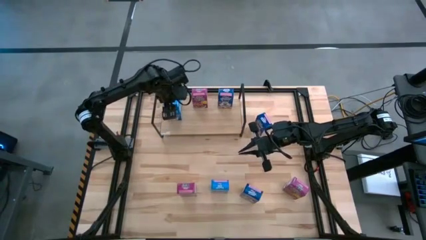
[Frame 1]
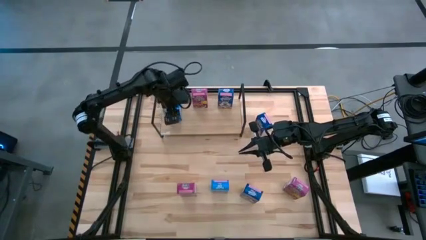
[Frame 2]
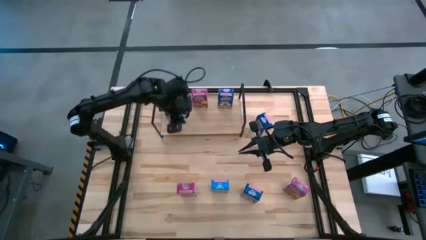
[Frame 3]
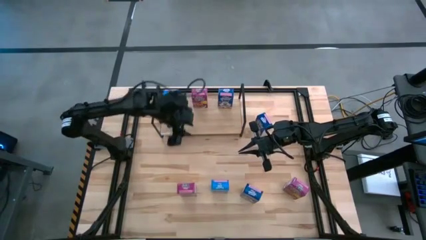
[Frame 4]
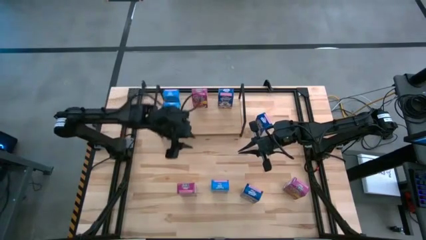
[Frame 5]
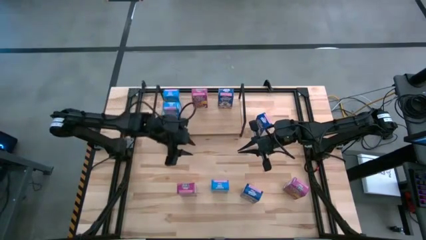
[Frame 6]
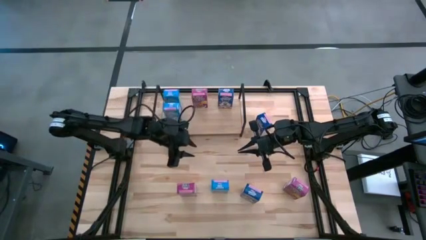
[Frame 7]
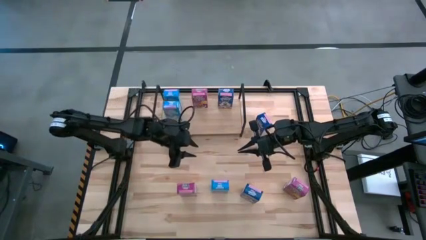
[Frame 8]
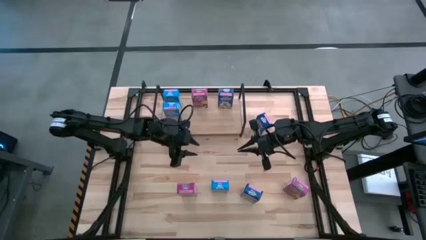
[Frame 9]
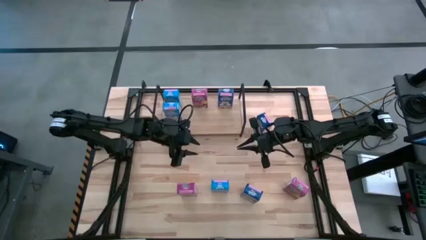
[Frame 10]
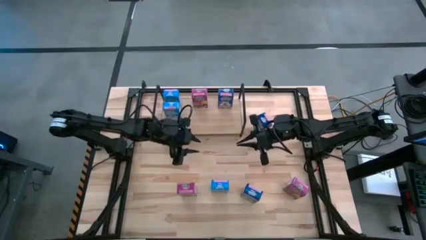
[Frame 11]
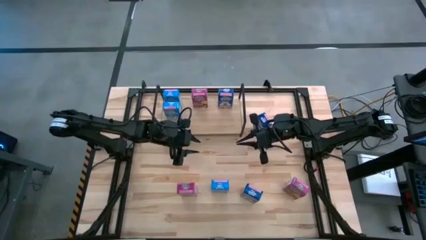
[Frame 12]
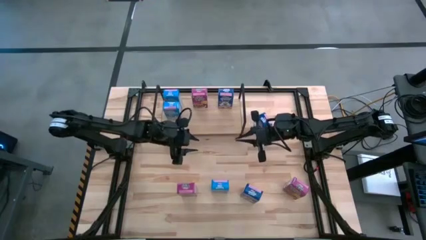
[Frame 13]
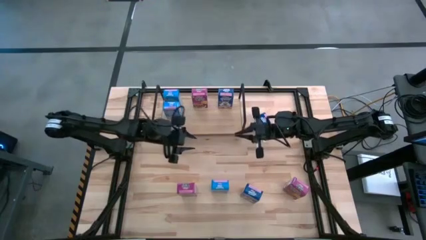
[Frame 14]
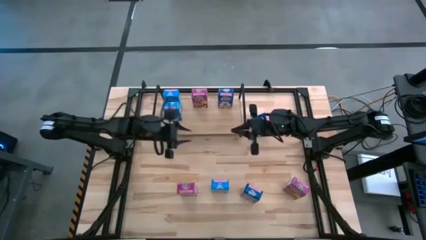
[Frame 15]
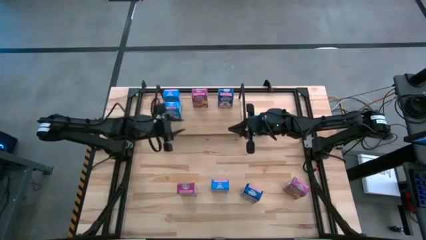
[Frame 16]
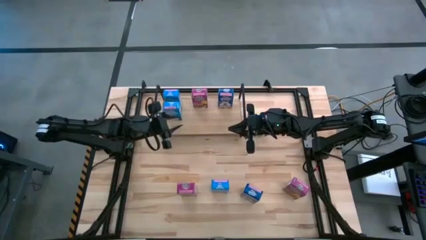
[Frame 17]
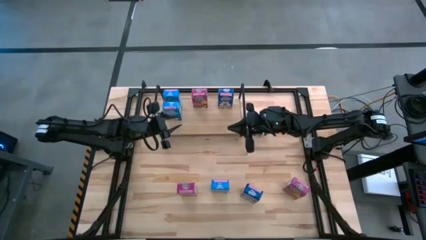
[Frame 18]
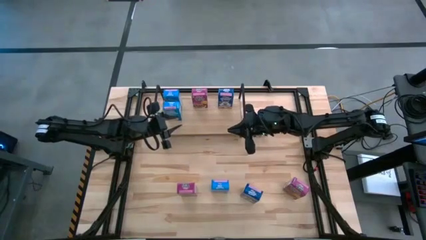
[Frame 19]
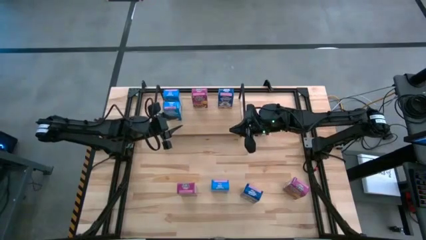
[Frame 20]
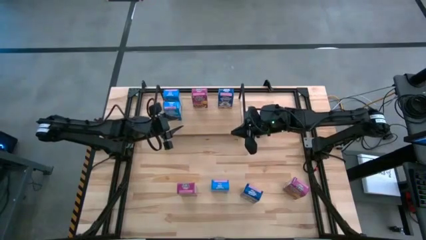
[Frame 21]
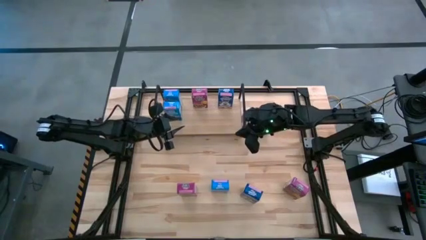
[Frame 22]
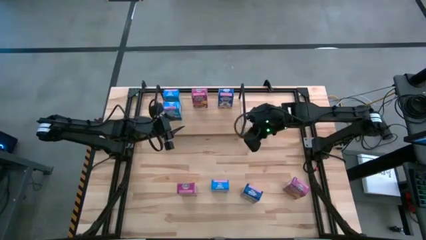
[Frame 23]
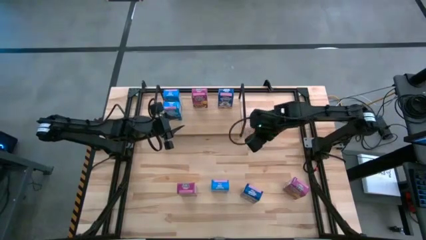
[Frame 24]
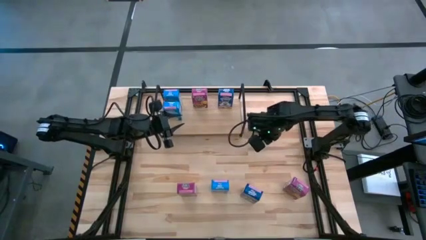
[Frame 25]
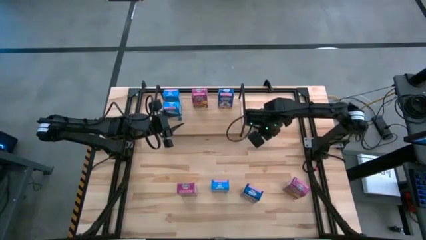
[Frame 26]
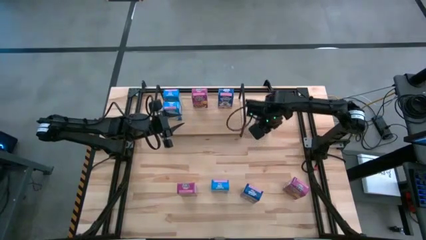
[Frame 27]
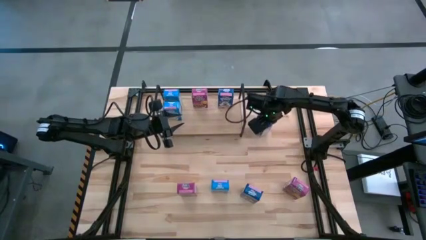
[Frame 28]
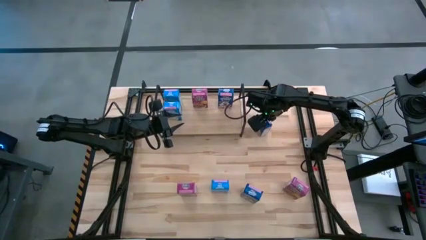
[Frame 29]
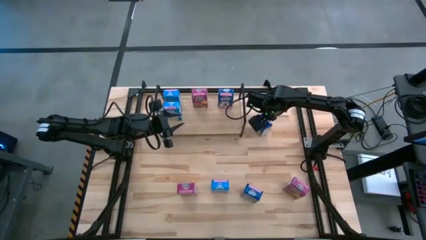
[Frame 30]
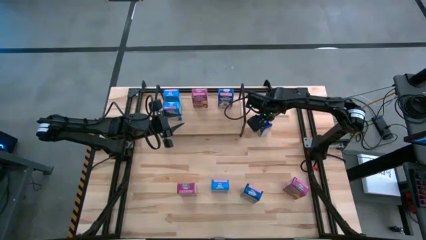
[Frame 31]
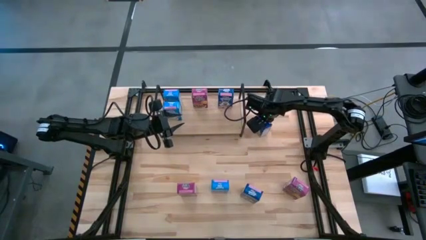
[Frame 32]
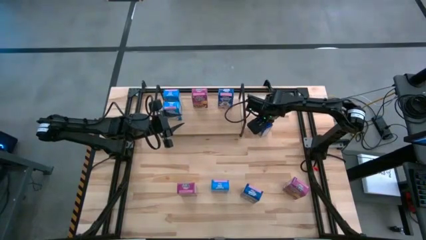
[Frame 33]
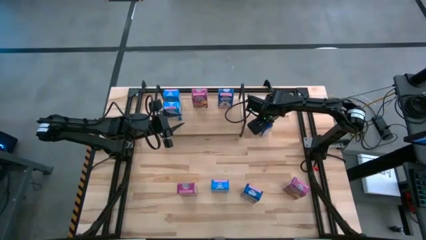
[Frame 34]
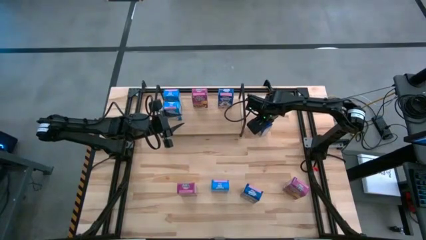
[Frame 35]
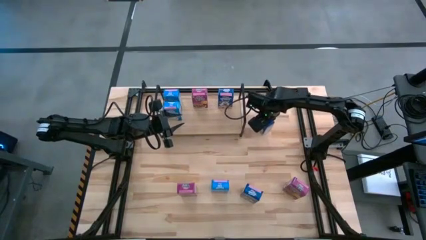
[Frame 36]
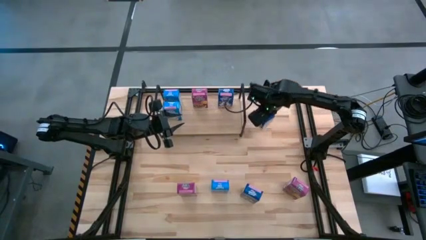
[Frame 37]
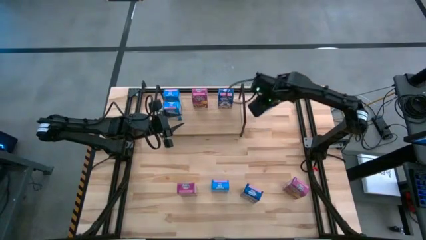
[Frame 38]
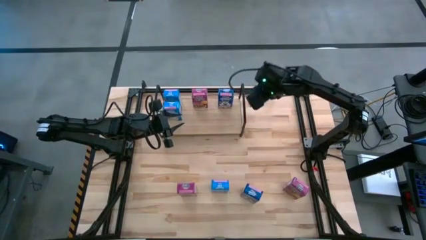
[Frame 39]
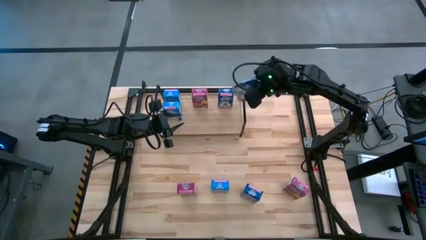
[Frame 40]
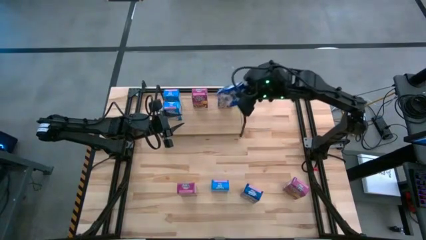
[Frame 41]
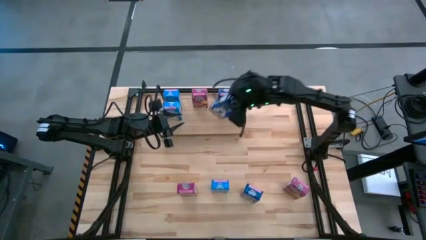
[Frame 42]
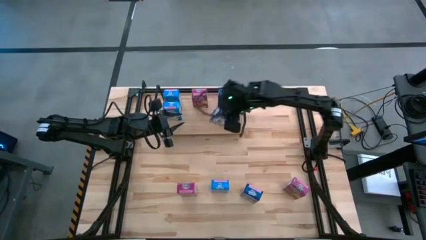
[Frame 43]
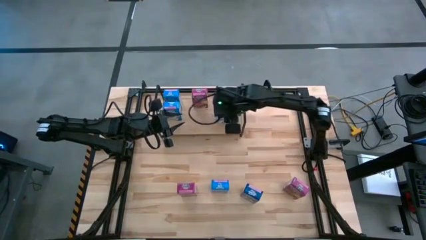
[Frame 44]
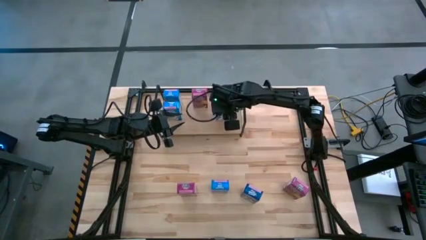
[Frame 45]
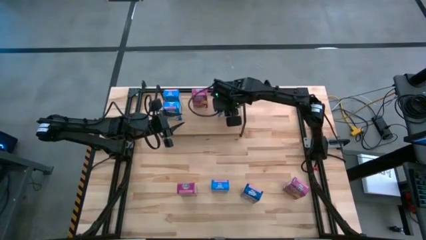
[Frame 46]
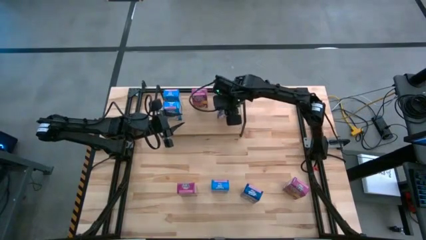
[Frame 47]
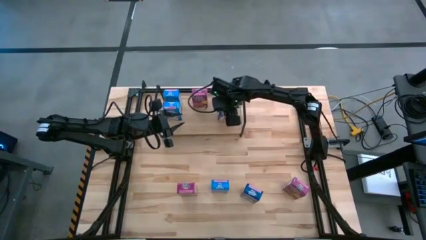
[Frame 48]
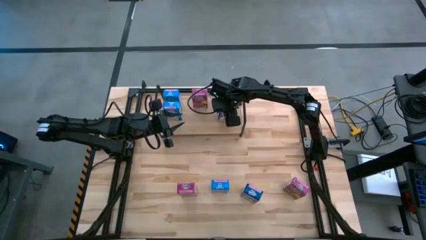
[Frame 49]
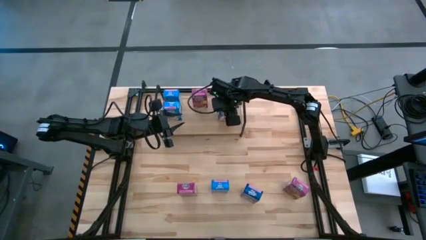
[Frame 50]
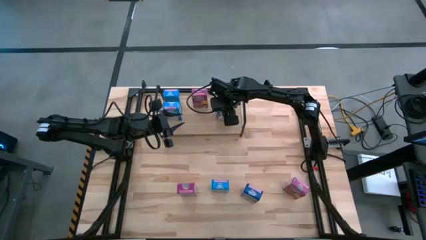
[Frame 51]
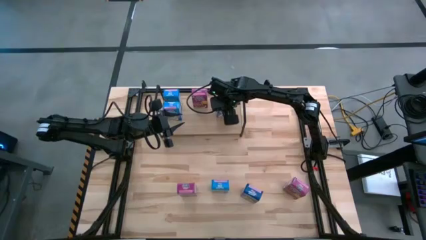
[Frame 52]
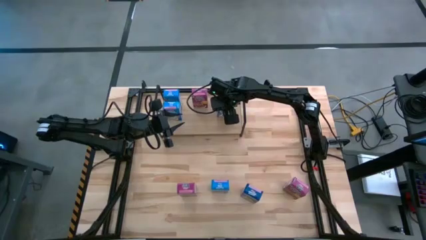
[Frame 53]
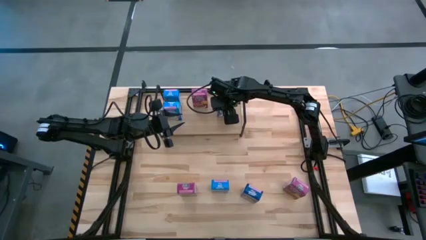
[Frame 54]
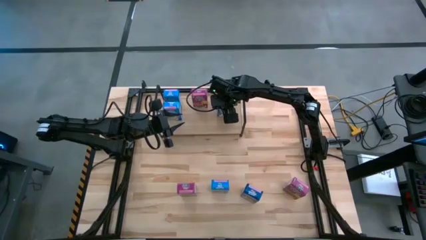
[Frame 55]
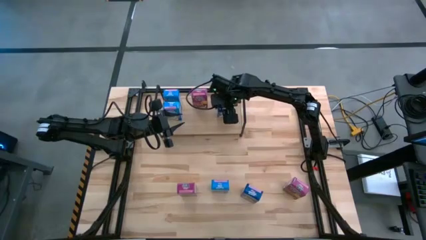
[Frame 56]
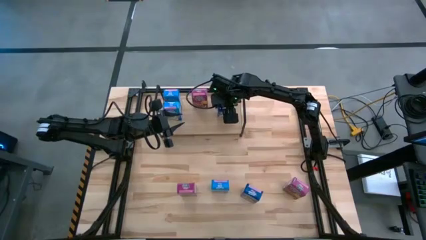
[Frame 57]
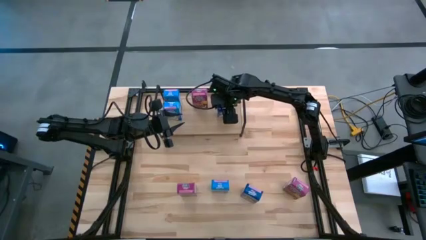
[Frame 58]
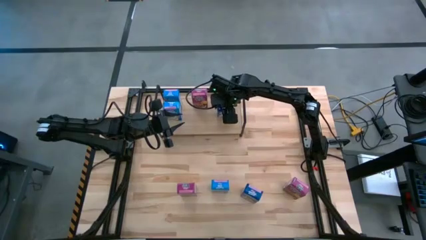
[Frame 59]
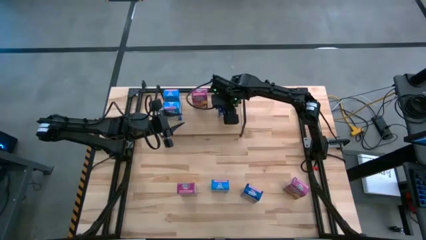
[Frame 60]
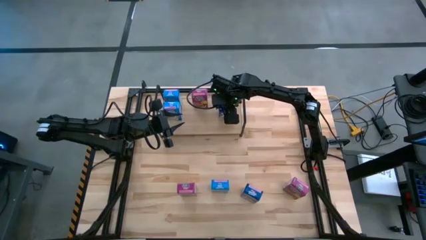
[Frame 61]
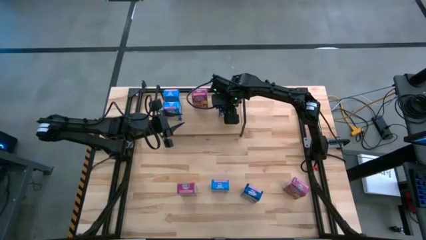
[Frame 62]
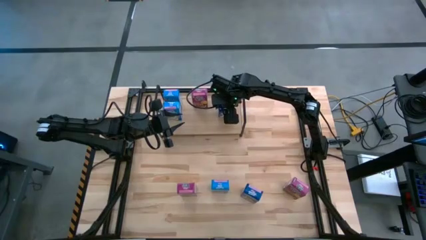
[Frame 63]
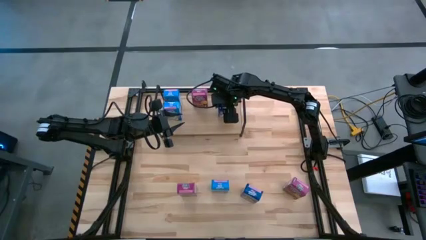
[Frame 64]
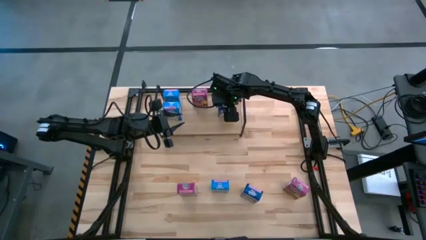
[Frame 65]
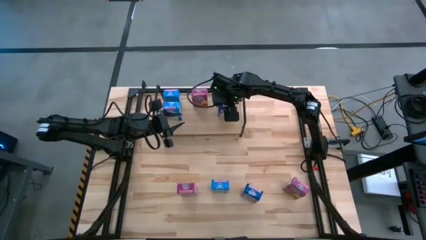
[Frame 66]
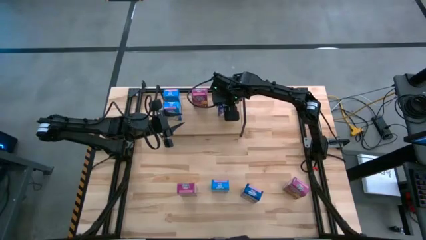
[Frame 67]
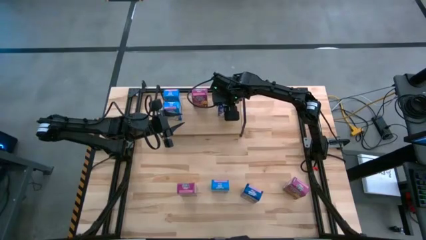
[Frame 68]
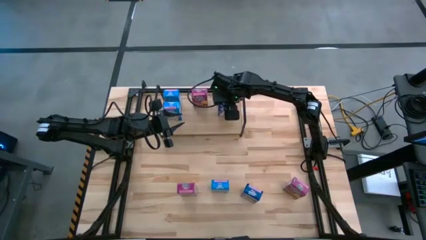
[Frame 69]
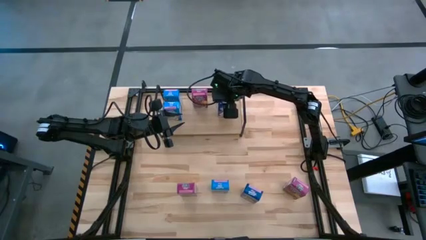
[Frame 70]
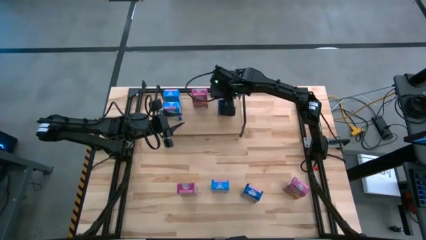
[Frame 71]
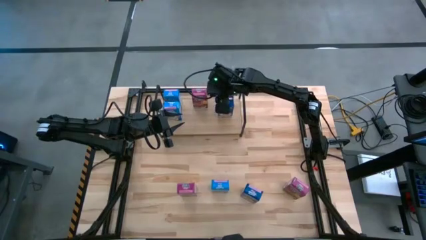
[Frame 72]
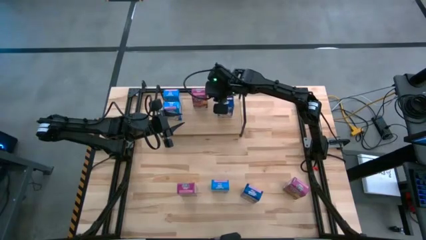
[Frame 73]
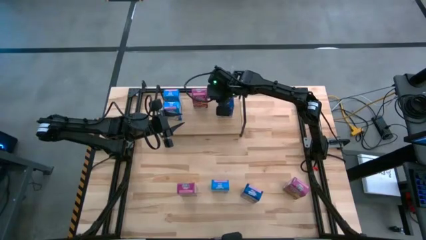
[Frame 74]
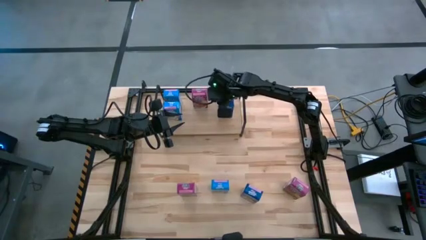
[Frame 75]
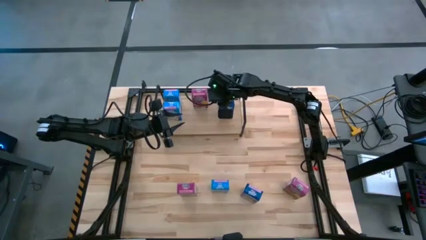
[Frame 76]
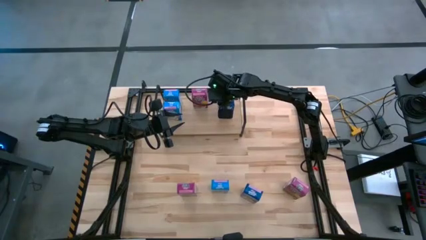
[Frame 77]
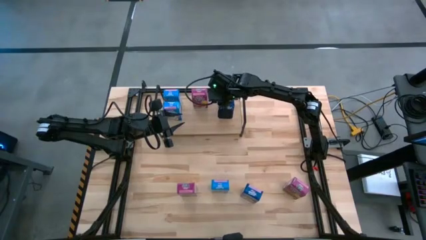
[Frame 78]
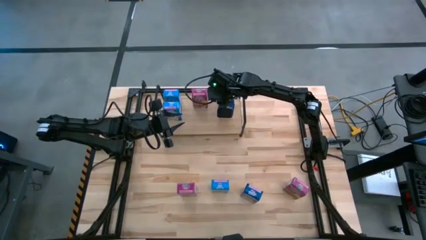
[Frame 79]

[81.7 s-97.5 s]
Task: Stack cereal on shelf
Put the top blue cereal box on the shelf aligned with the blue cereal box

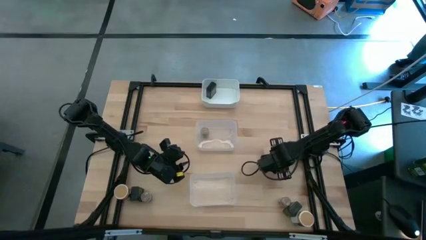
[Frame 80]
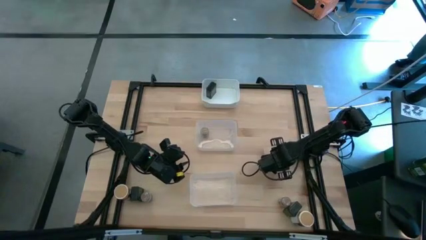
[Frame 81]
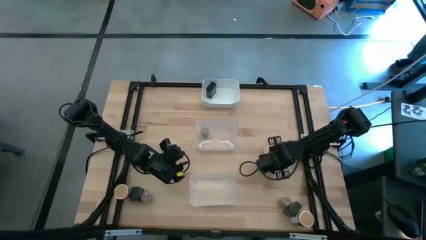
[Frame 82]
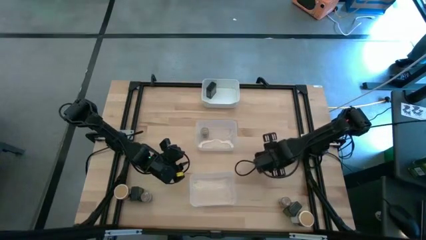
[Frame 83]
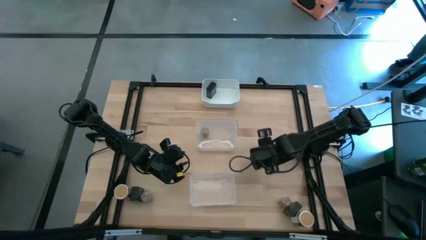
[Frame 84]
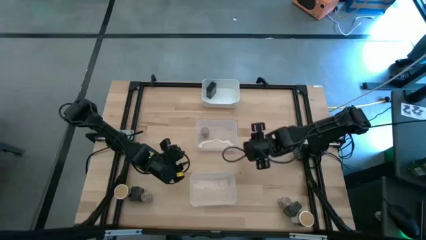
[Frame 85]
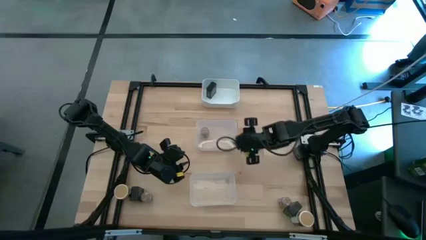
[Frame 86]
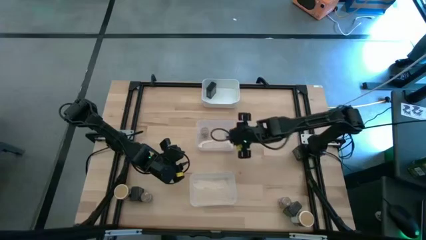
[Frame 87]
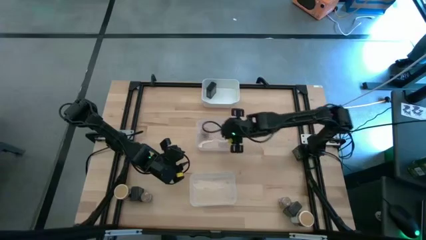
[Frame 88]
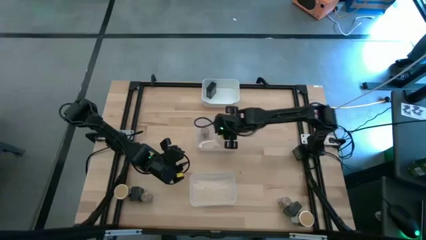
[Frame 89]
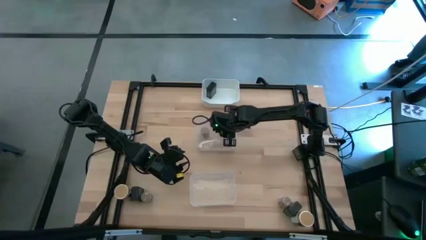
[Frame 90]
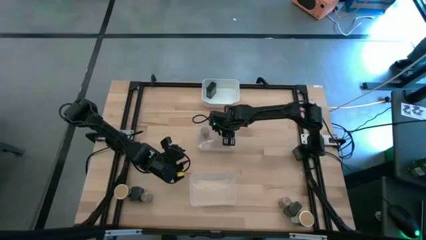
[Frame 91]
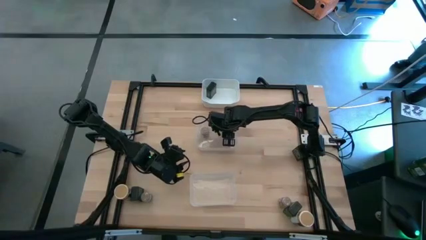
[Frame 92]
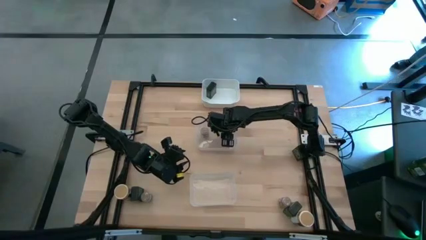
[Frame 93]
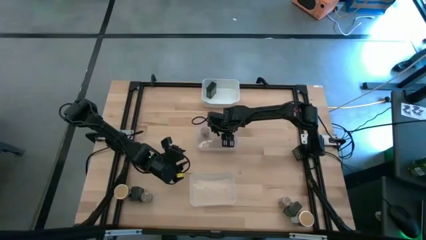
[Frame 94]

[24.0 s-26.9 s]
Task: Sort spices by type
Put the top brown seasoning bottle into the top transparent bin
